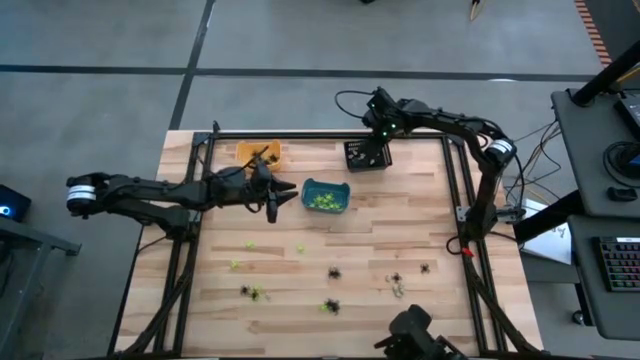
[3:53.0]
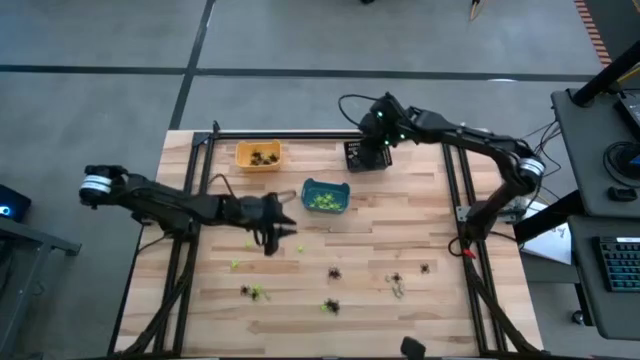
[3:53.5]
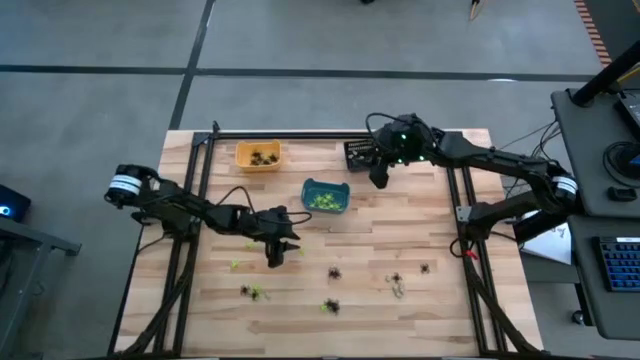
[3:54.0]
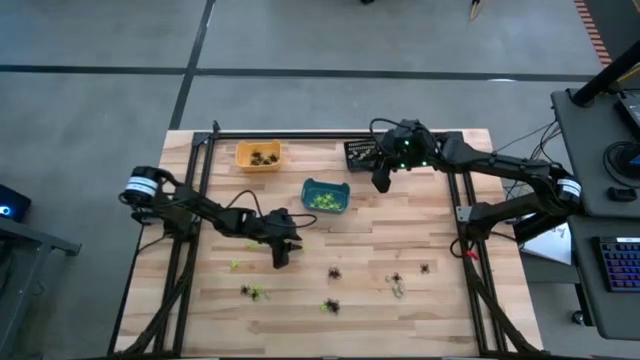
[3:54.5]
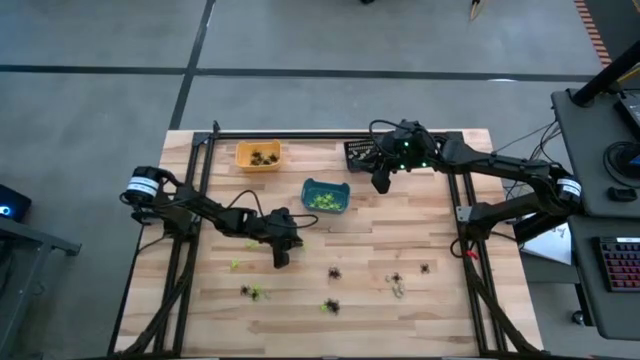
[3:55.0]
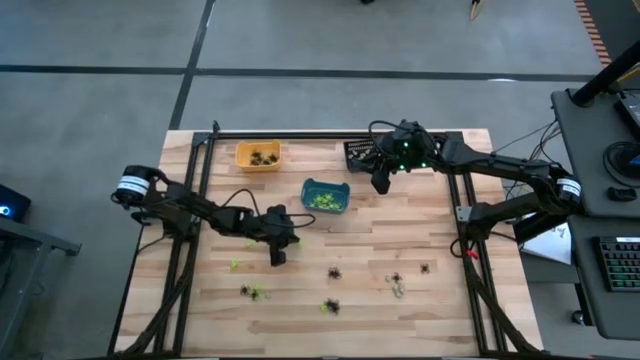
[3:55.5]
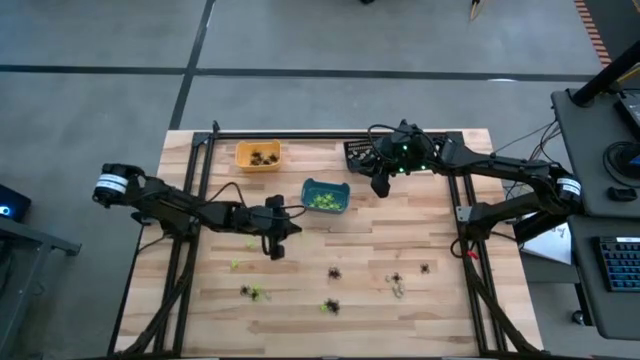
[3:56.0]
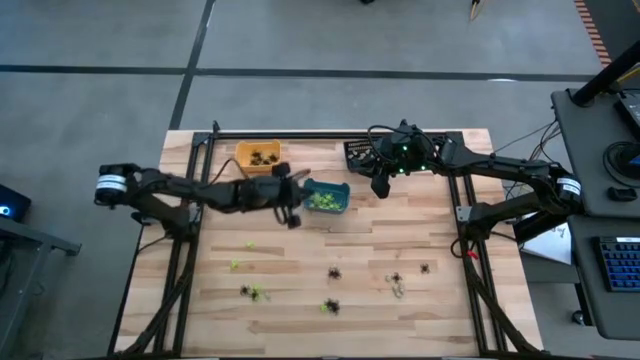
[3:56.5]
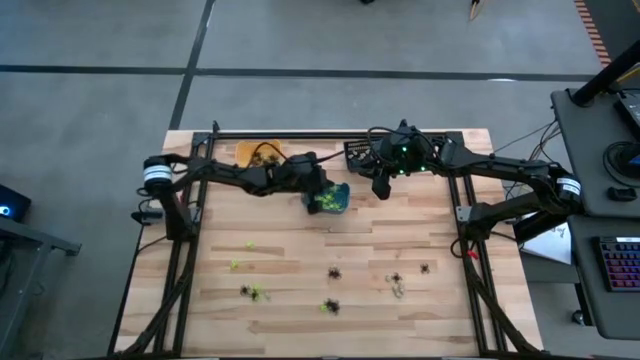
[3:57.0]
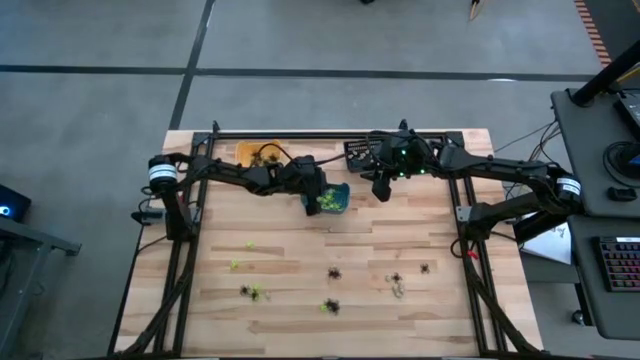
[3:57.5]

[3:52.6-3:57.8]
Task: Sort Halloween decoration
Put the green spider toy into the blue bin

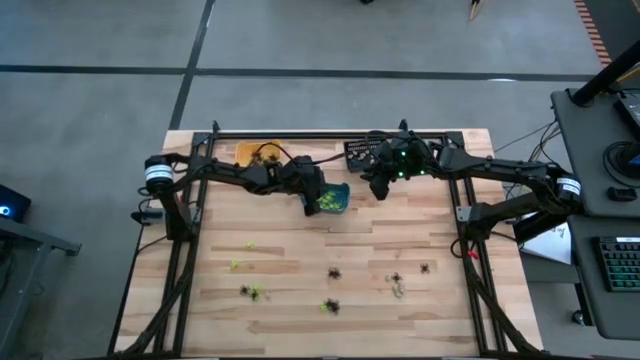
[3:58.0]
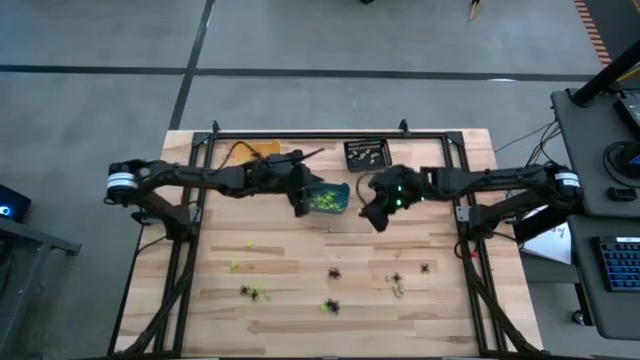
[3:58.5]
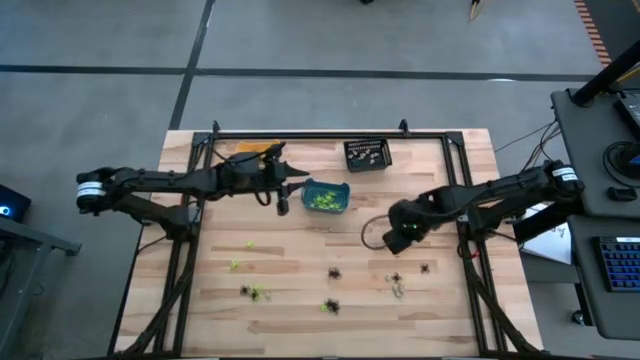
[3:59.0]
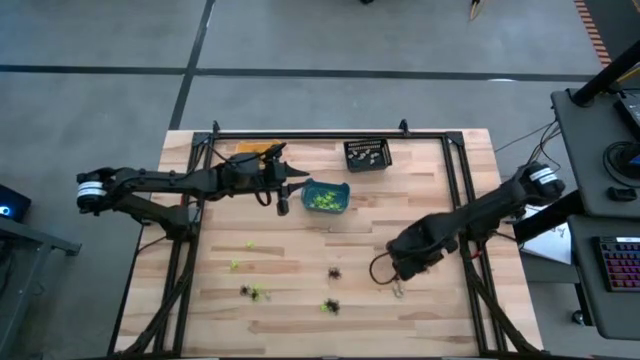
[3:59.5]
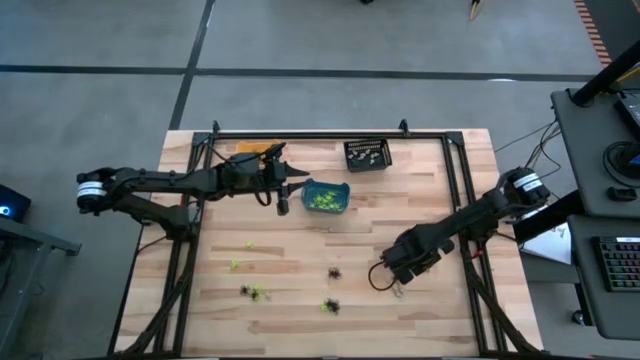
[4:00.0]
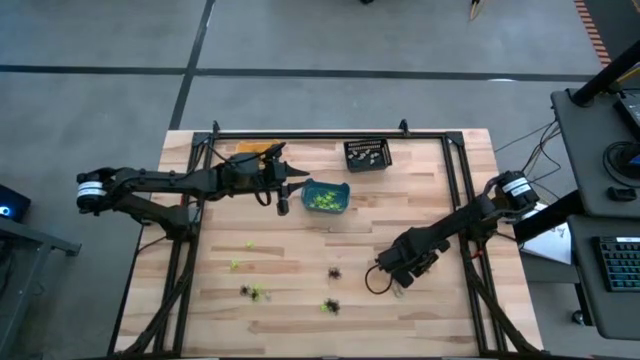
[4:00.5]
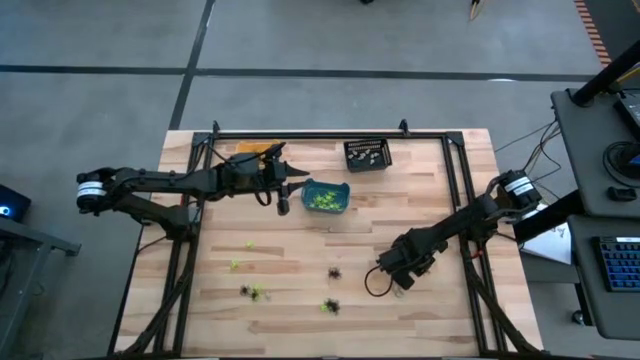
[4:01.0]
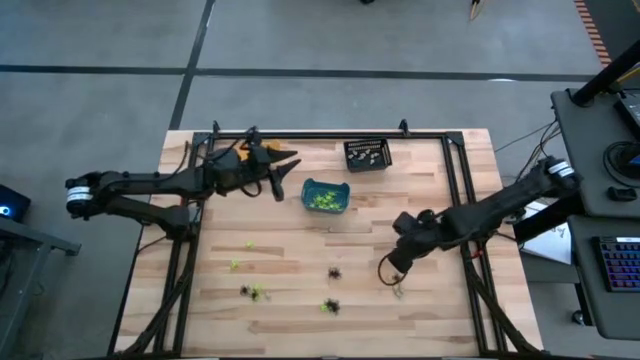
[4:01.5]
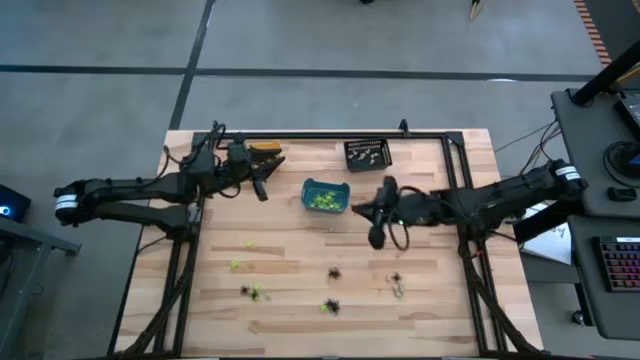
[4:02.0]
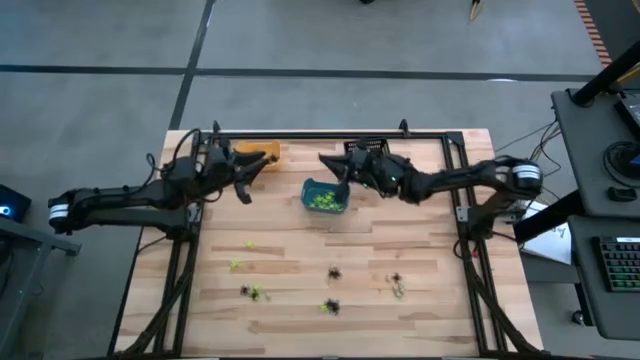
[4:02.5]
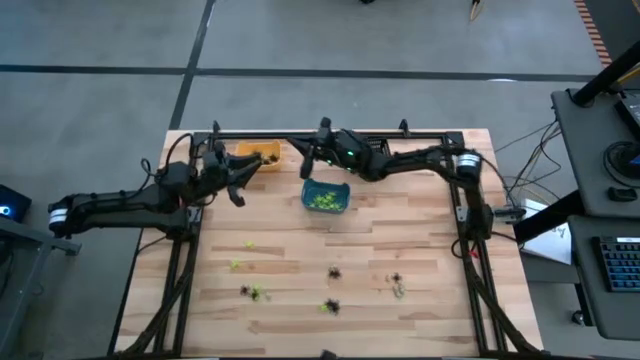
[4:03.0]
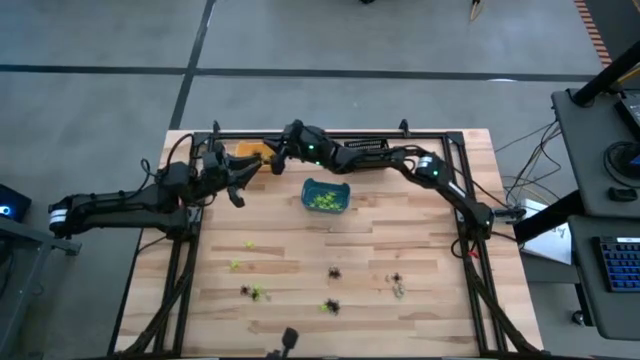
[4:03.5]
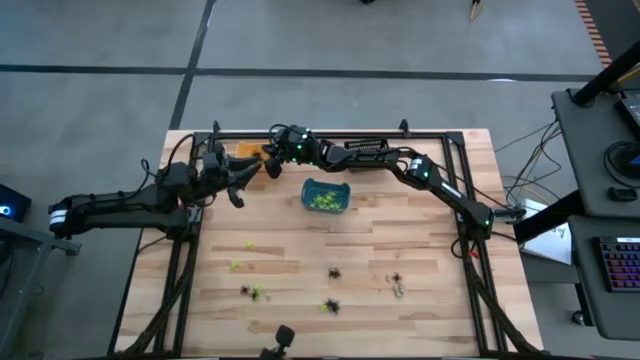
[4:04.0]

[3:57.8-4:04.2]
Put the black spider toy into the yellow bin

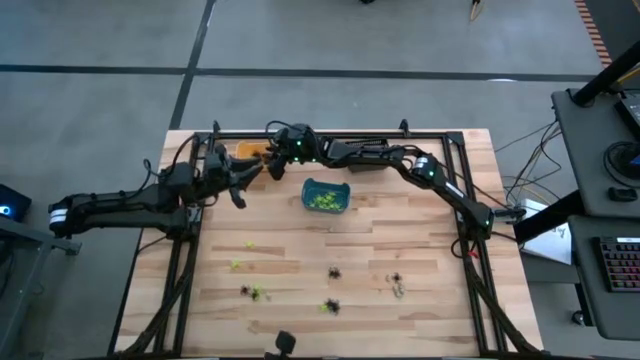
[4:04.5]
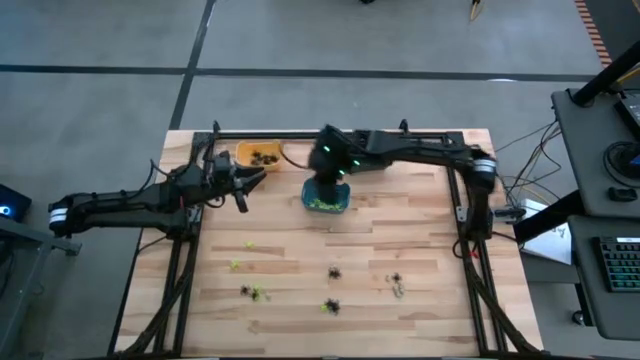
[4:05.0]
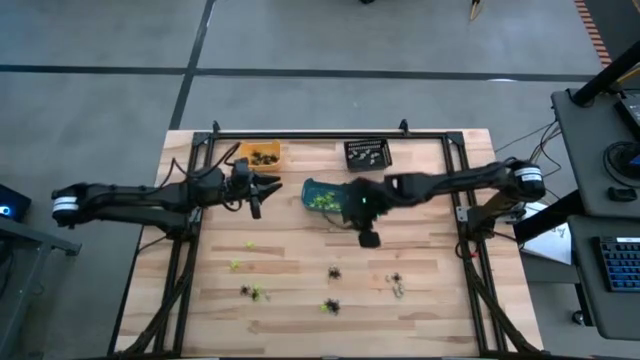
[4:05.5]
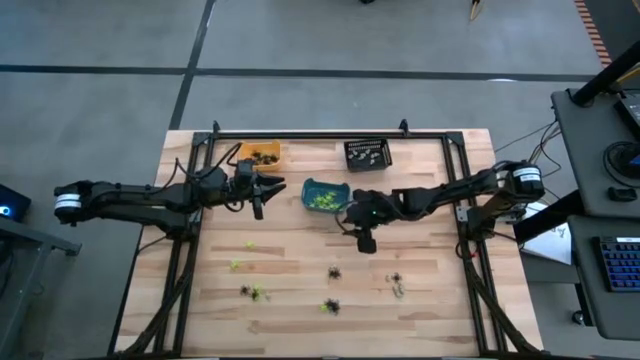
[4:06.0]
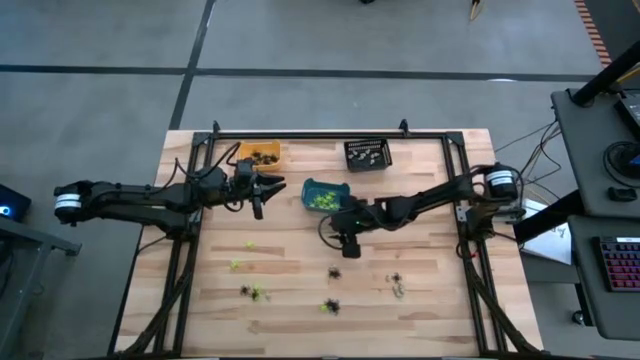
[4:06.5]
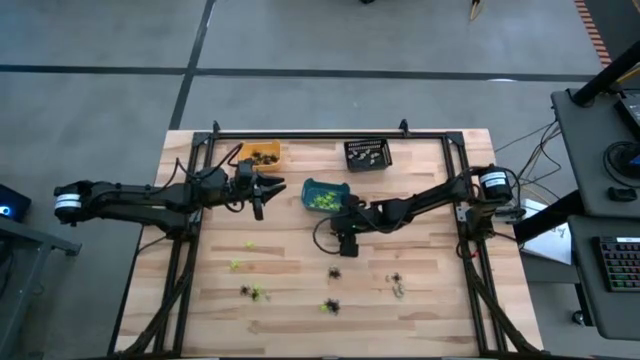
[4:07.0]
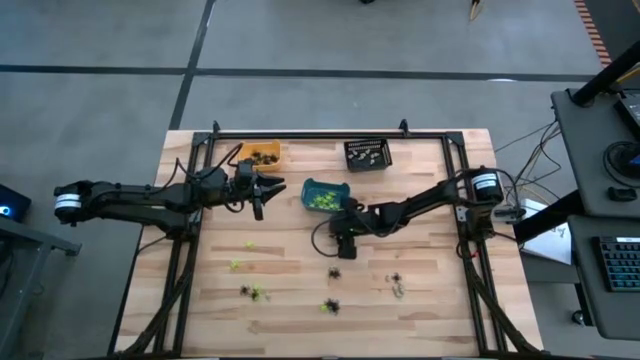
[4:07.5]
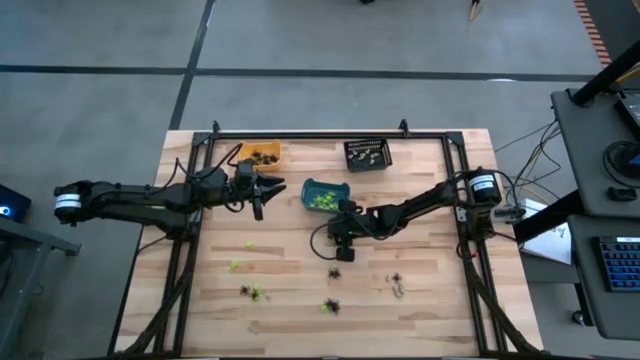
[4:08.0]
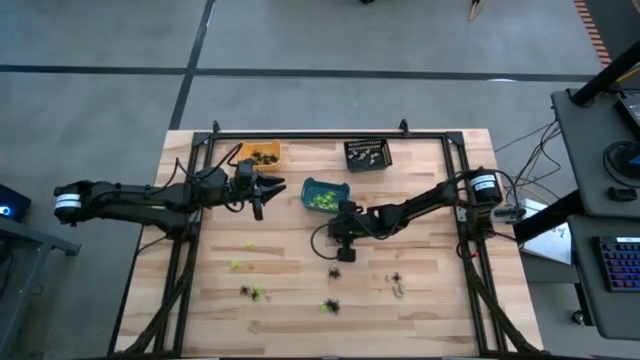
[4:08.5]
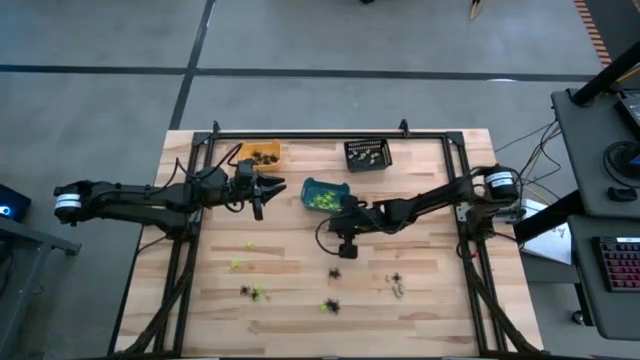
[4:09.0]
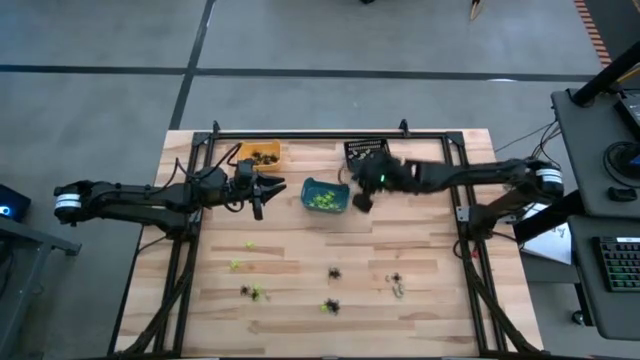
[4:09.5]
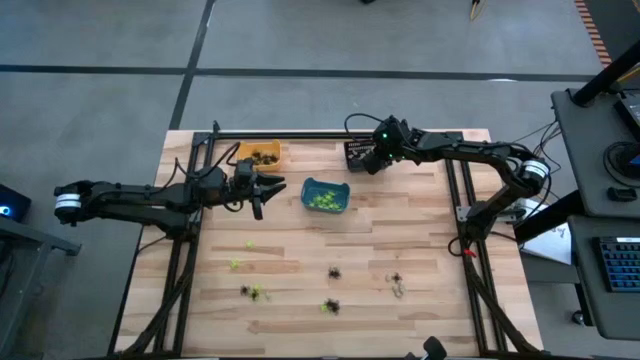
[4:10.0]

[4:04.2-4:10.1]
Put the white skull toy into the black bin

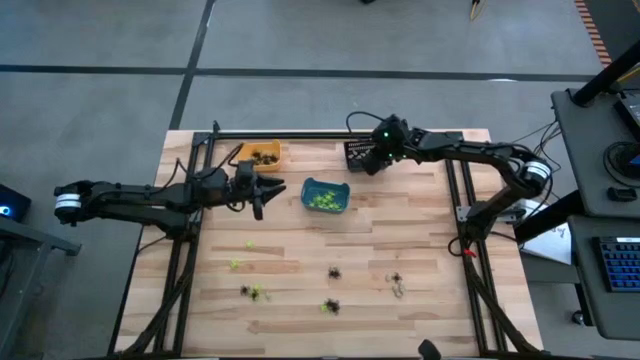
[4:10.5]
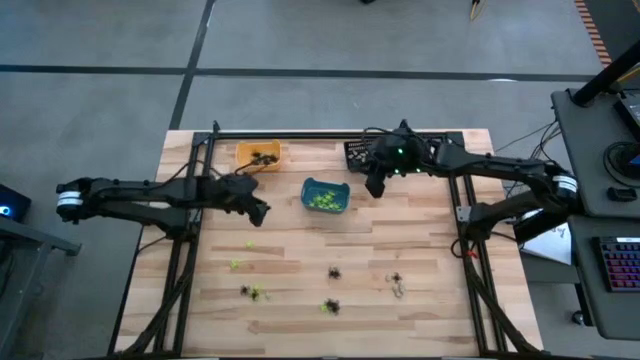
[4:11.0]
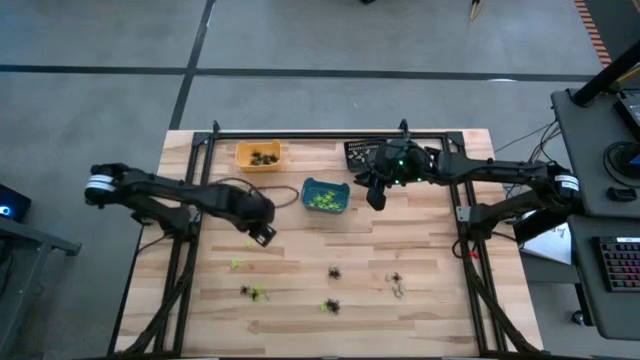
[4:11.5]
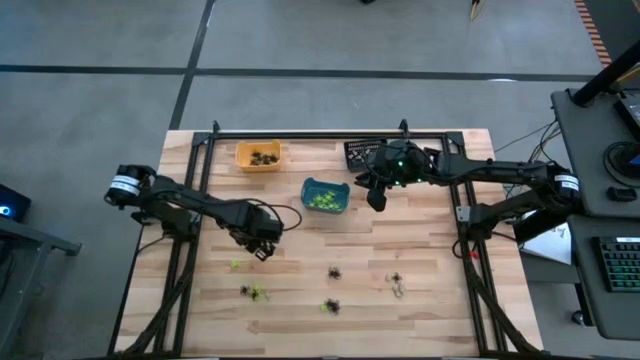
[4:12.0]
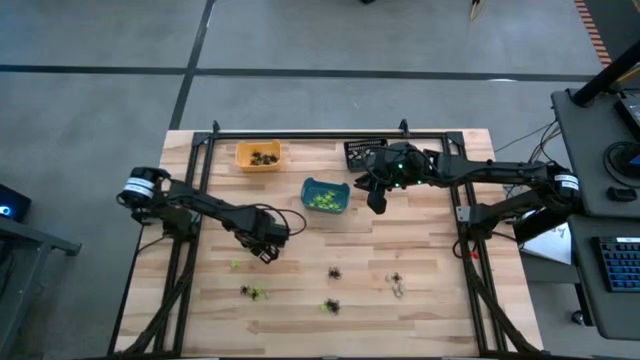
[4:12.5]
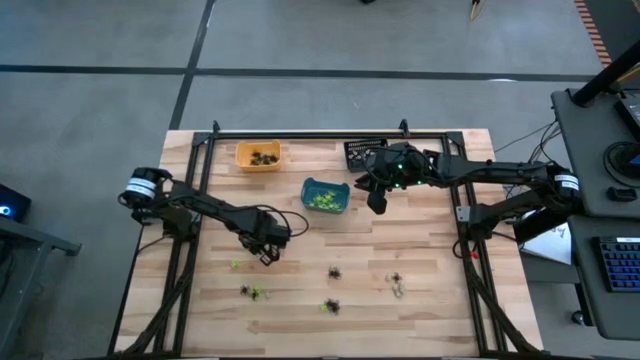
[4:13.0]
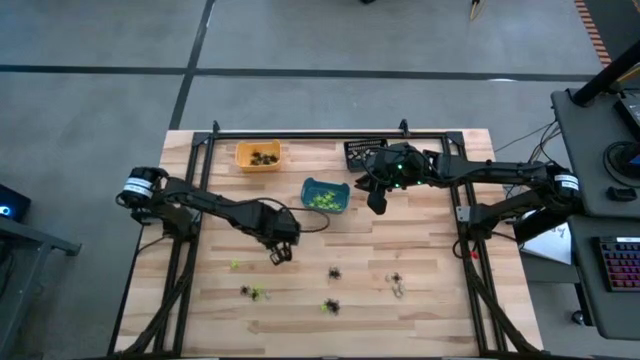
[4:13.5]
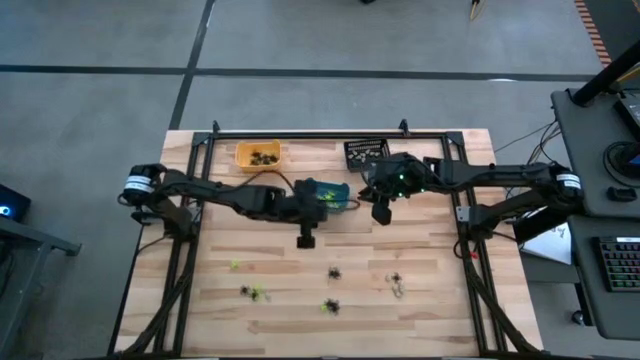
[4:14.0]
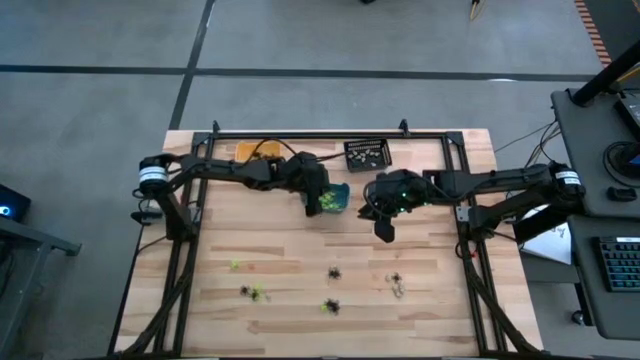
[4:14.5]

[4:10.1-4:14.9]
Put the green spider toy into the blue bin
